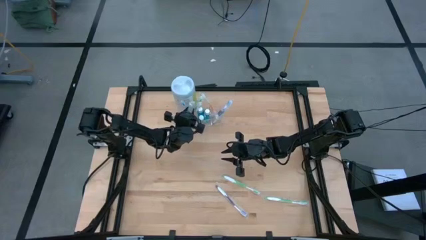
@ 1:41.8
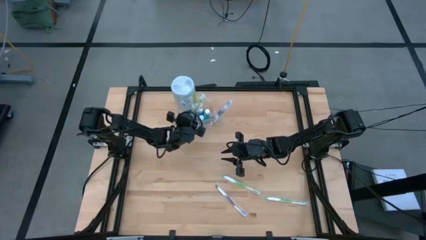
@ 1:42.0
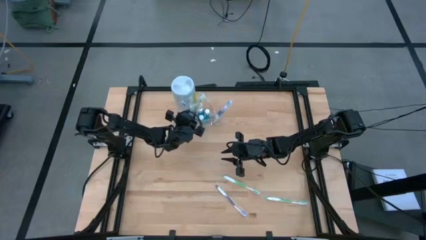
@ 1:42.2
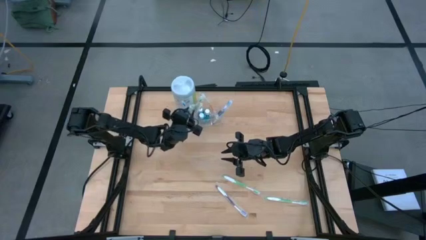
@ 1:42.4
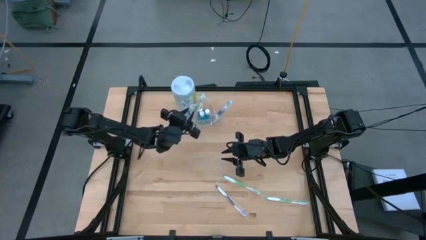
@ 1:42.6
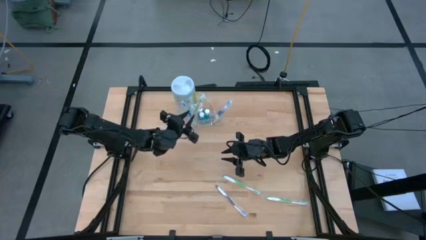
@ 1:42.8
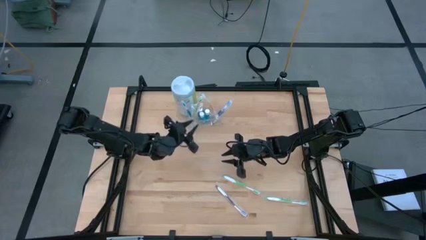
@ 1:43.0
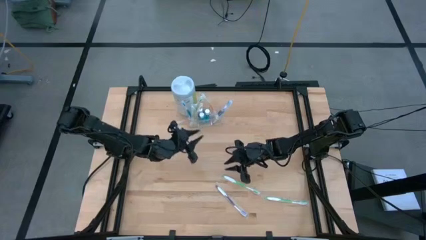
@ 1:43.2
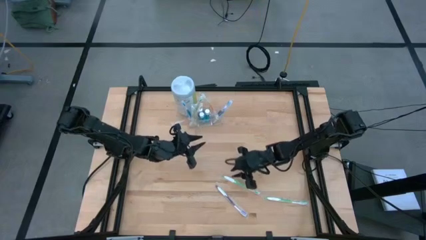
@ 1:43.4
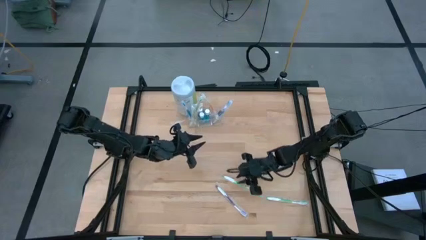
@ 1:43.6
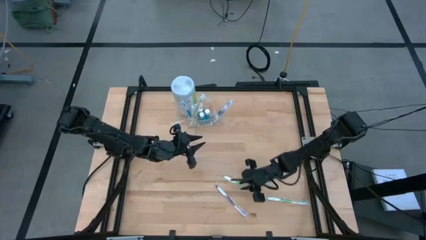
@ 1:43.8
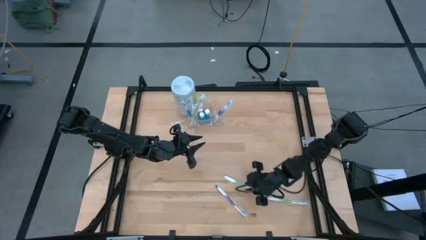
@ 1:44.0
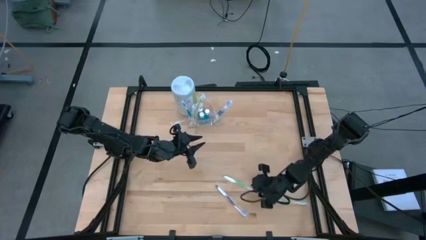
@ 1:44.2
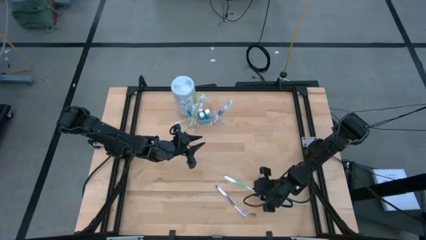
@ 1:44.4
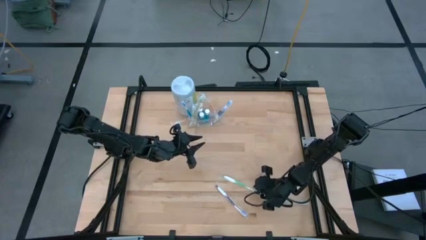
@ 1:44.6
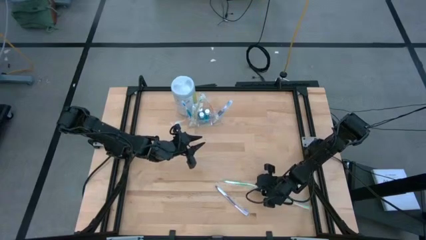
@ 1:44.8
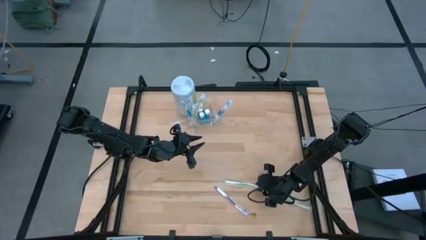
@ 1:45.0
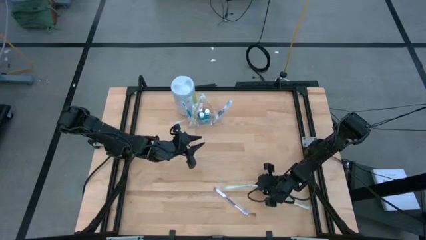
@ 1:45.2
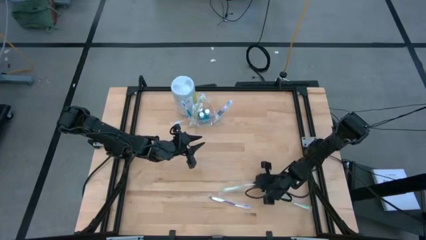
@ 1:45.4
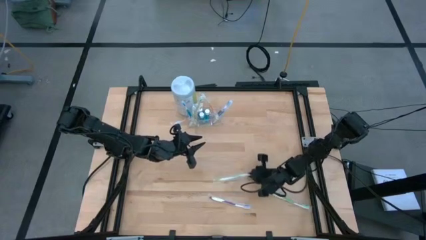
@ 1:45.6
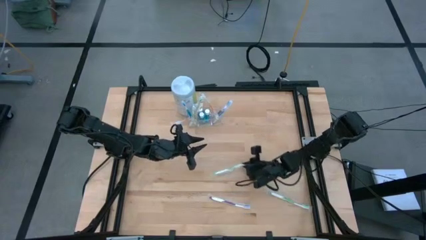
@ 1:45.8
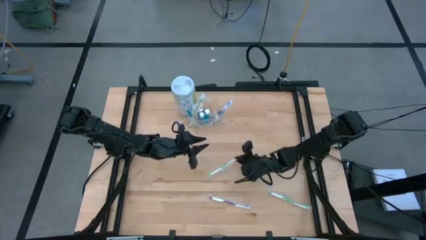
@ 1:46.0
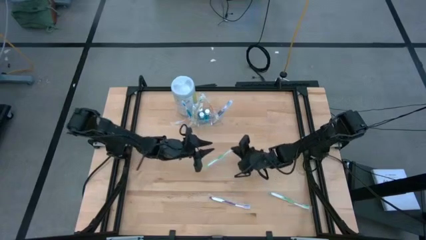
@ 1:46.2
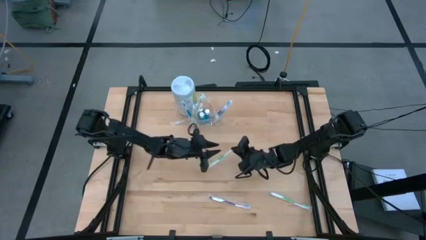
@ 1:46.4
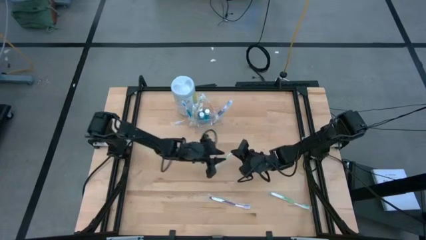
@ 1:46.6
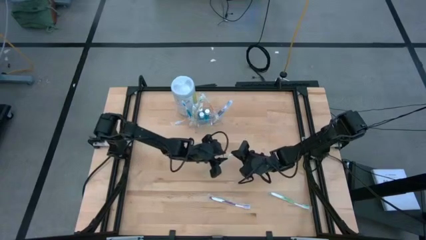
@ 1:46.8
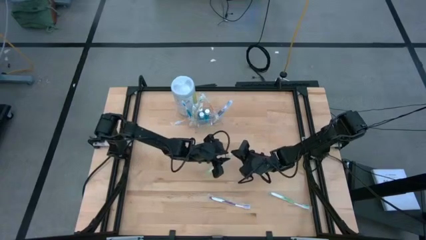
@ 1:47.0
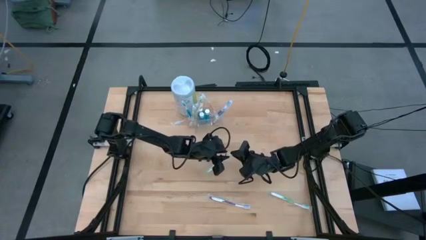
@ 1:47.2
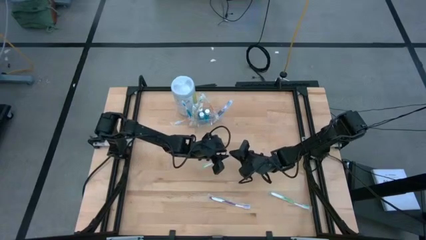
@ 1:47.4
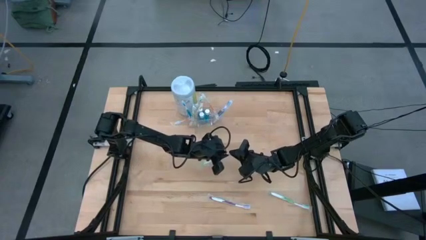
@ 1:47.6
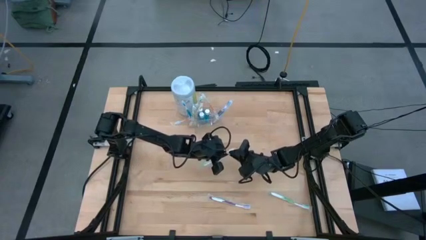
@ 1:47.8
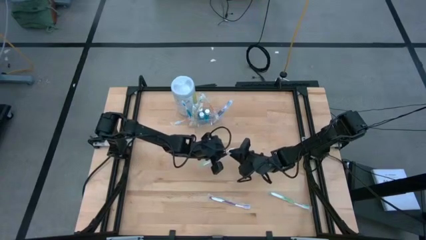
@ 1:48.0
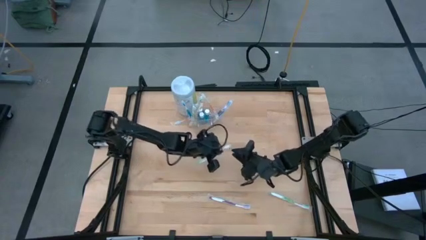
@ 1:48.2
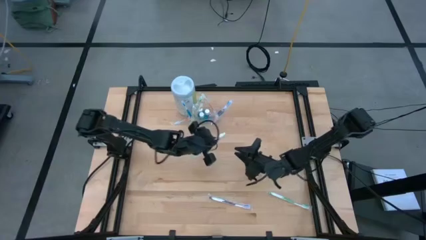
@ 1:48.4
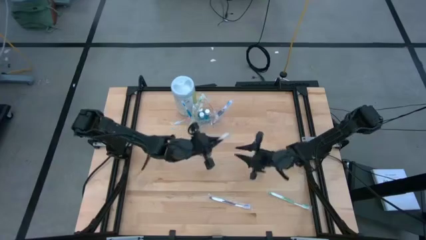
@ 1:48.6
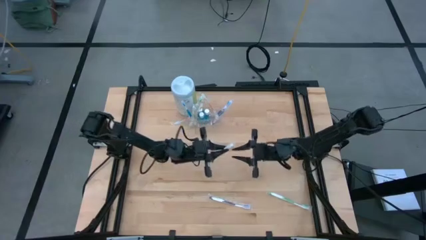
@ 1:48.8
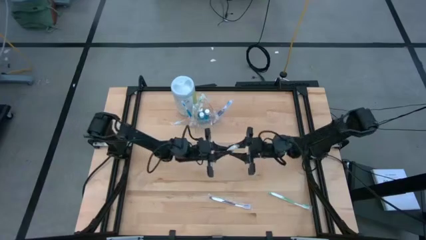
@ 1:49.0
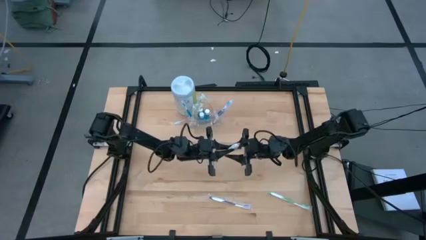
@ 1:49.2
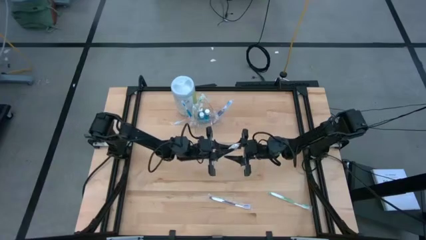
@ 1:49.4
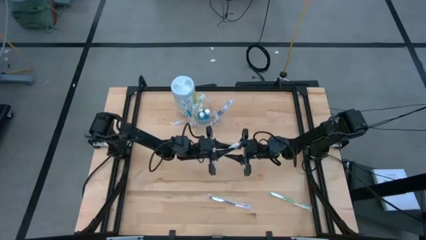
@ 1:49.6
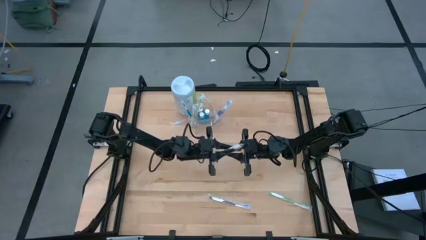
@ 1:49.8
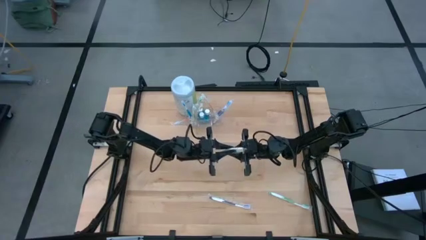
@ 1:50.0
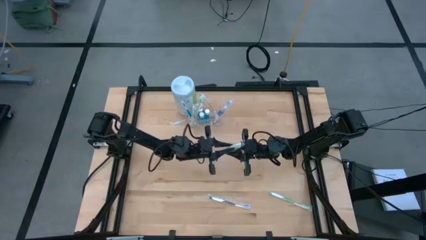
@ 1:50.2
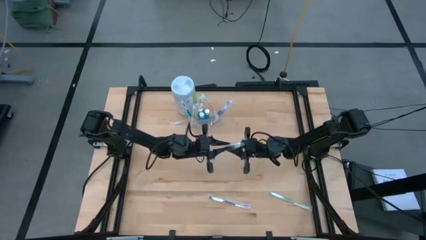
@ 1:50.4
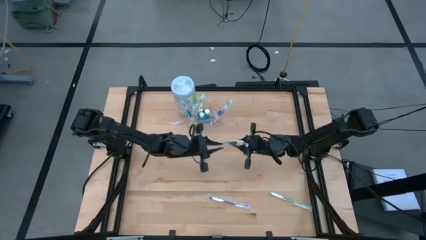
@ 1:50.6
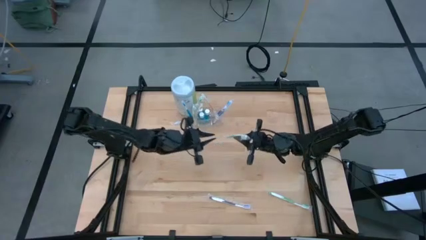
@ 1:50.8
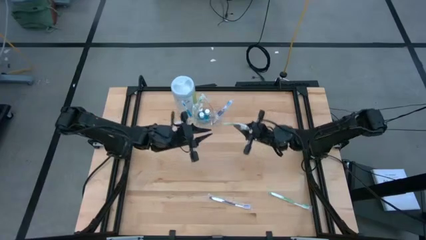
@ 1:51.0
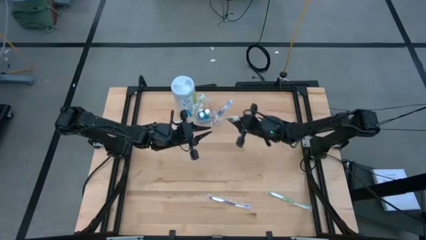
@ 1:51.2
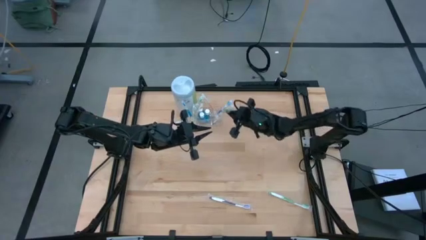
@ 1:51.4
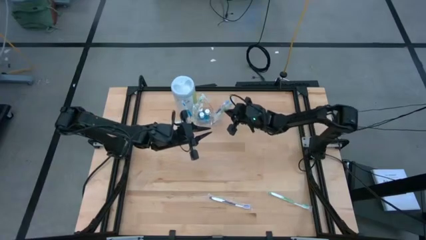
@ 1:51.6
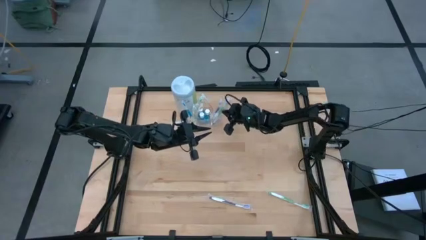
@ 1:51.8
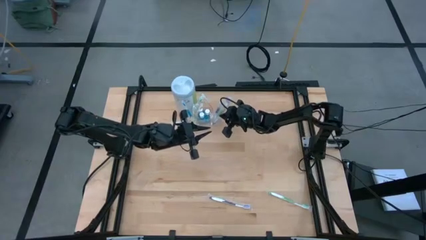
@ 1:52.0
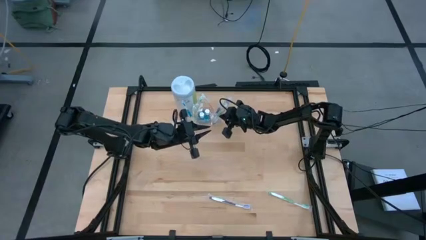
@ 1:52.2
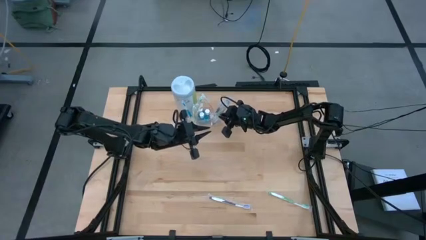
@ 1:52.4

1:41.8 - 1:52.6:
Task: Pick & Place toothbrushing station
Put the green toothbrush into the transparent organizer

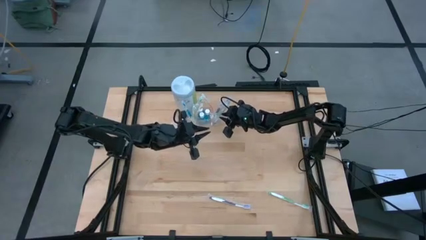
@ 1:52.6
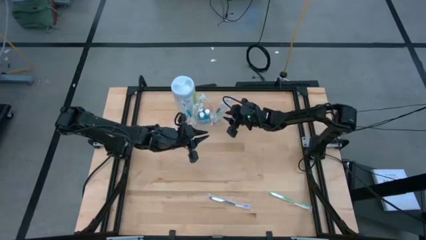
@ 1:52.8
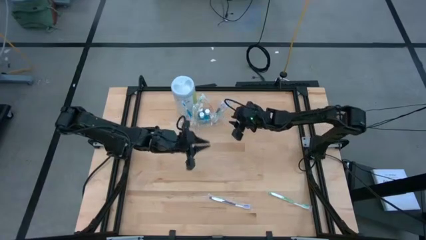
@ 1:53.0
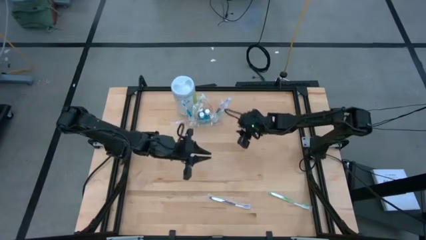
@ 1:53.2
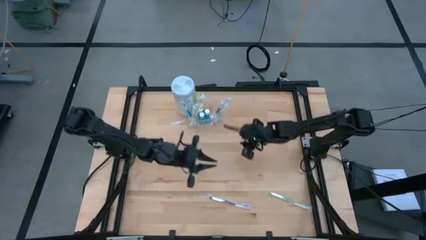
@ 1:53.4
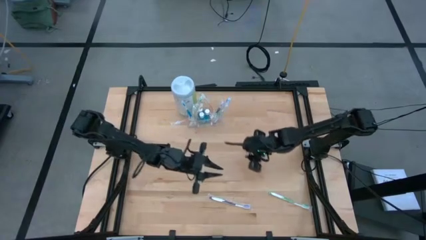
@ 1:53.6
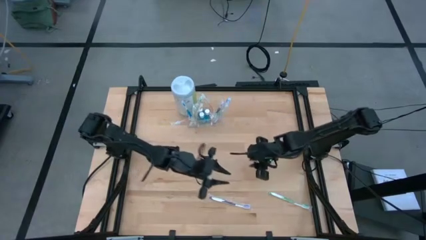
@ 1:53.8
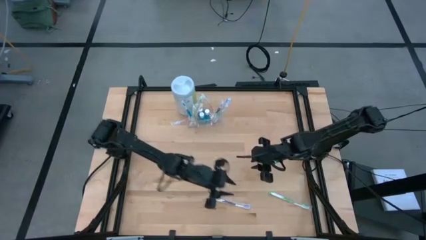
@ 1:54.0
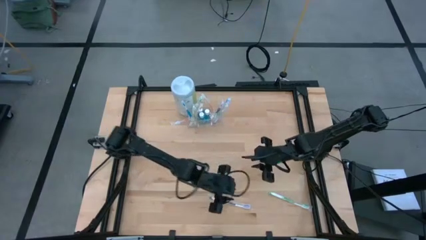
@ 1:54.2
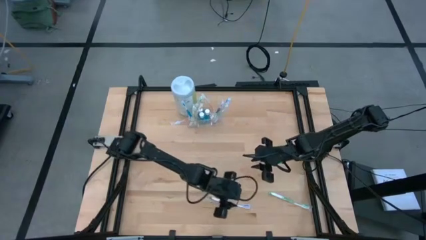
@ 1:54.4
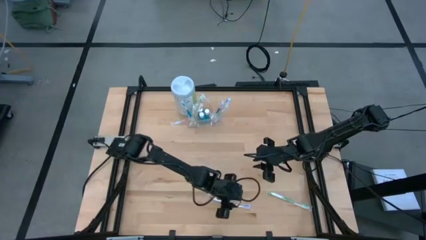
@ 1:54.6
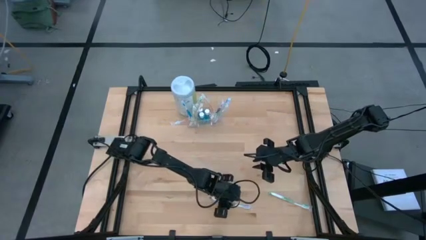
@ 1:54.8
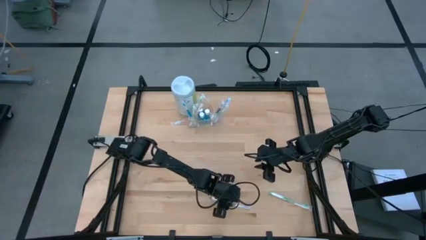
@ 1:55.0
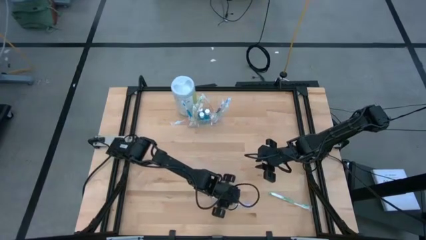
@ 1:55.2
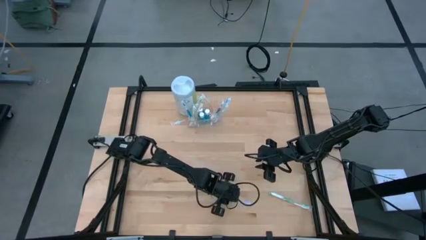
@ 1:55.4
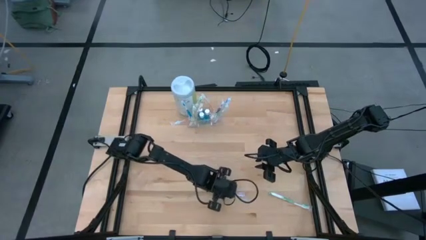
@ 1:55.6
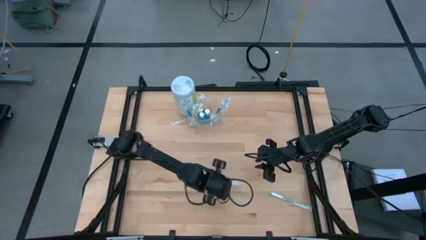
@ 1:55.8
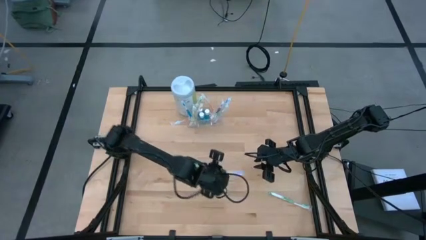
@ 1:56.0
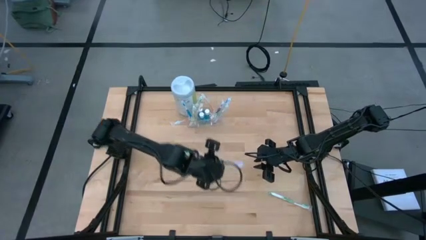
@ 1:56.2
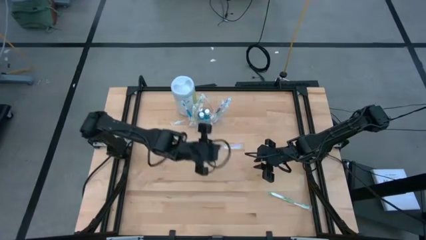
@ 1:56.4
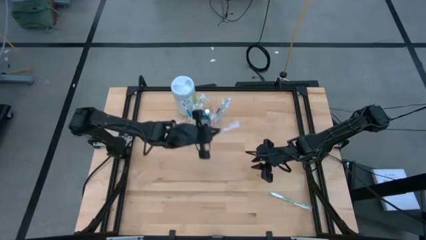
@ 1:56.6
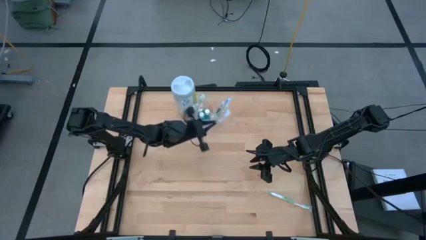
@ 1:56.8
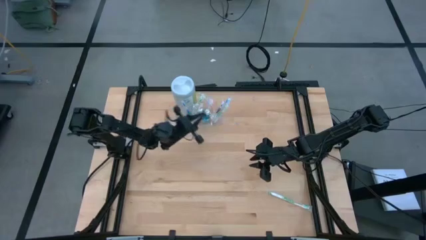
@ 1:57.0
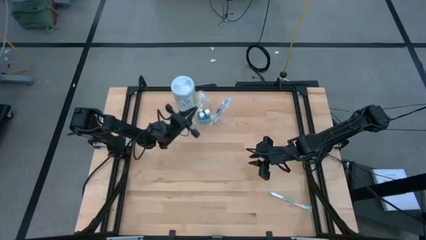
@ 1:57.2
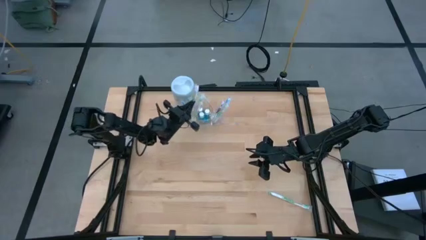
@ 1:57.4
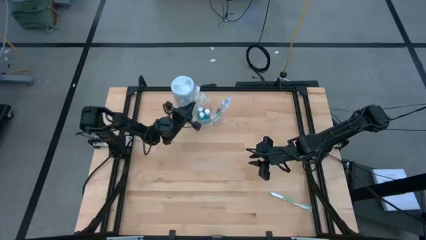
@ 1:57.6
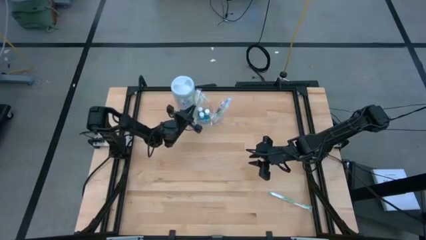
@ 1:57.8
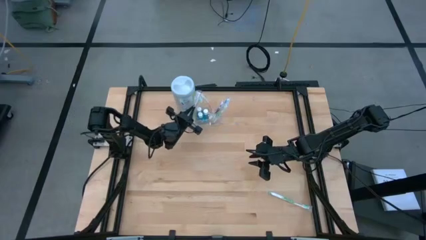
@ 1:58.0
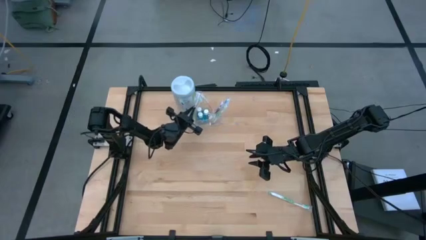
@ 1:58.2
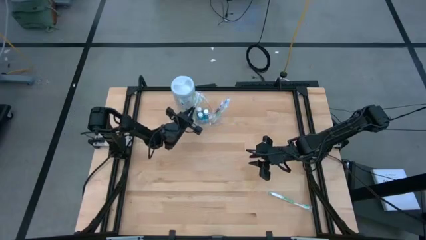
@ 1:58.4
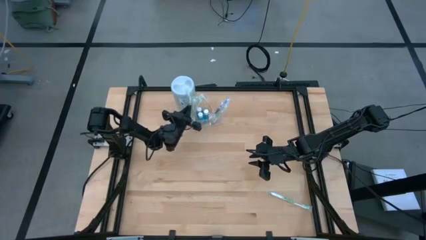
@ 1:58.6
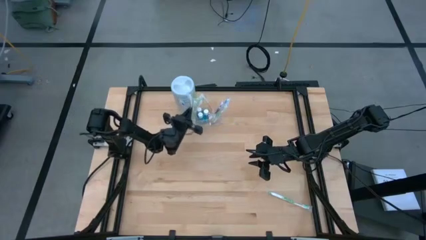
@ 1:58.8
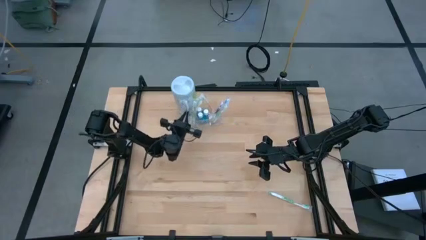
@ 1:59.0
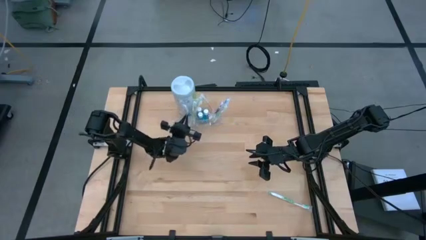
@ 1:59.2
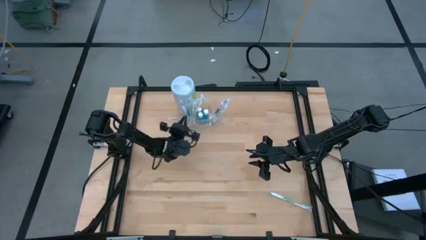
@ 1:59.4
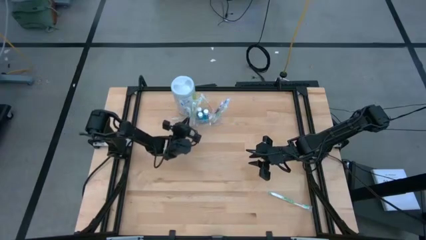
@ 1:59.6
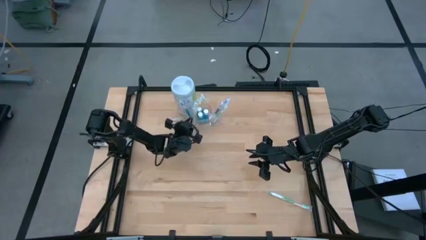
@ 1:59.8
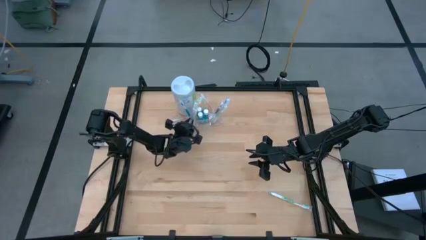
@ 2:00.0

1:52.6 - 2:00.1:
Put the purple toothbrush into the transparent organizer
